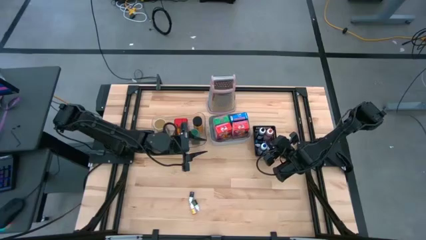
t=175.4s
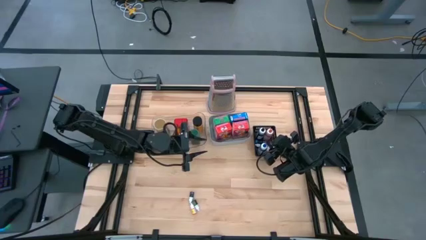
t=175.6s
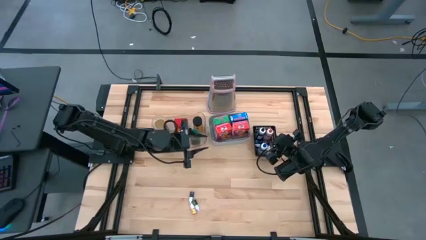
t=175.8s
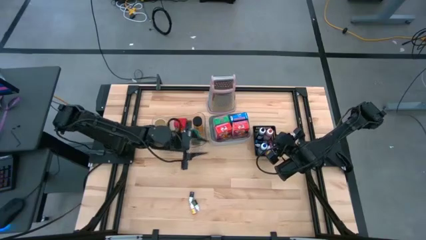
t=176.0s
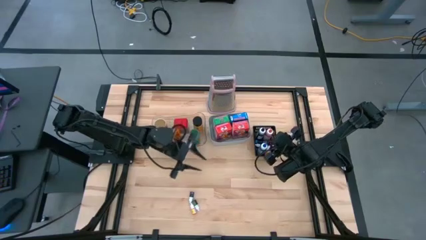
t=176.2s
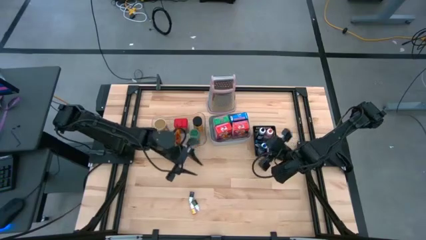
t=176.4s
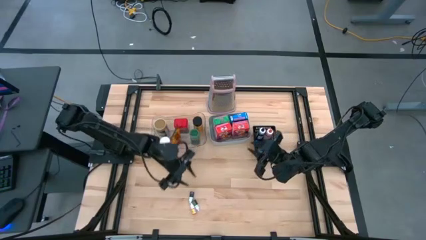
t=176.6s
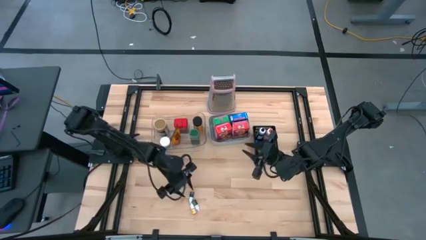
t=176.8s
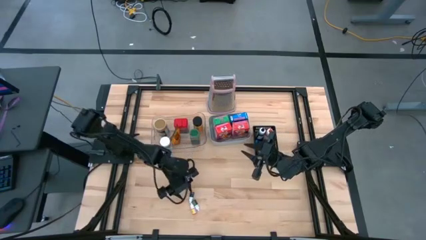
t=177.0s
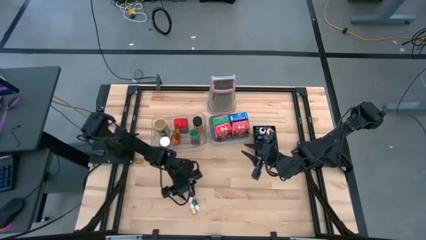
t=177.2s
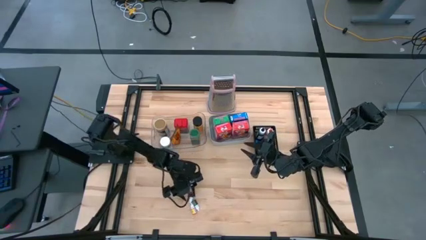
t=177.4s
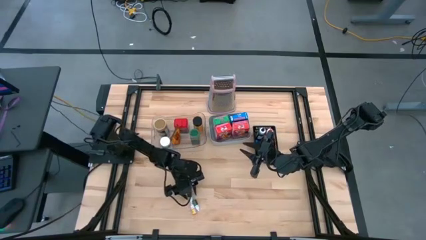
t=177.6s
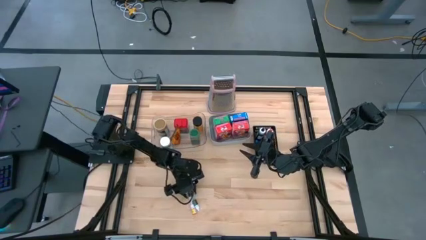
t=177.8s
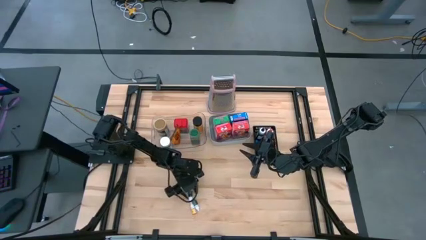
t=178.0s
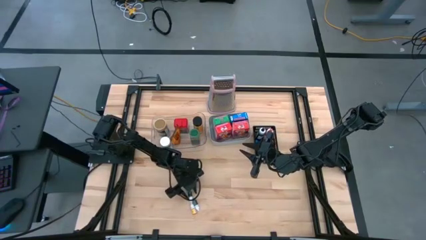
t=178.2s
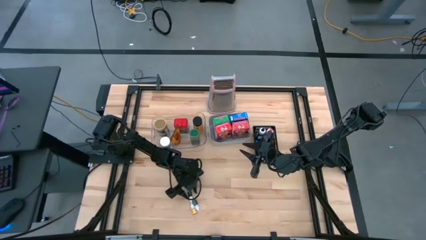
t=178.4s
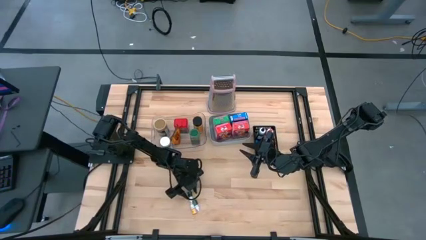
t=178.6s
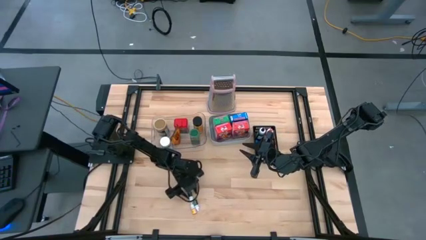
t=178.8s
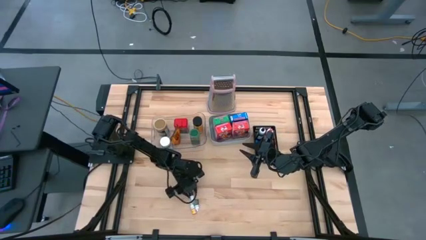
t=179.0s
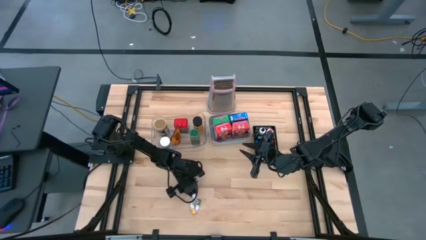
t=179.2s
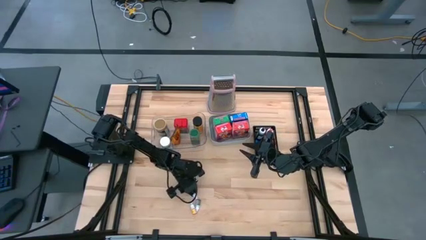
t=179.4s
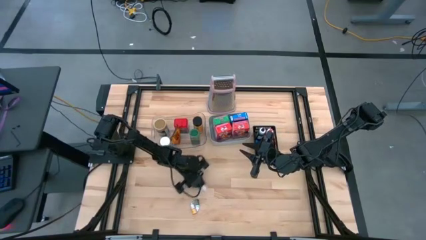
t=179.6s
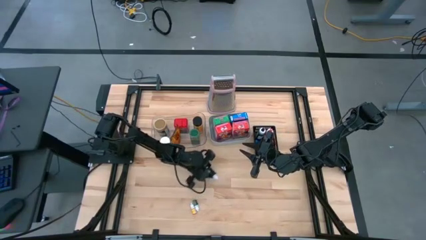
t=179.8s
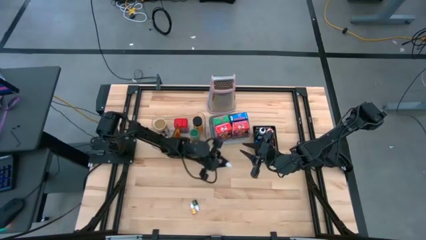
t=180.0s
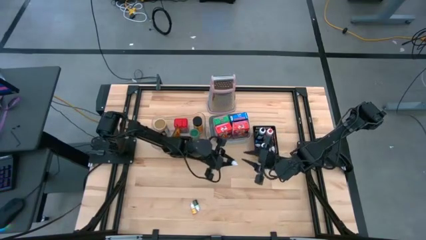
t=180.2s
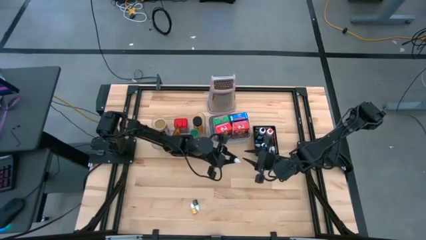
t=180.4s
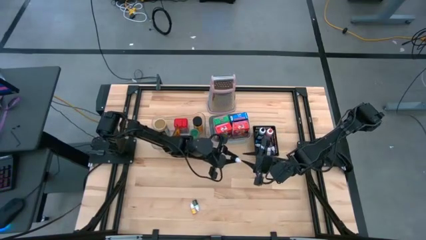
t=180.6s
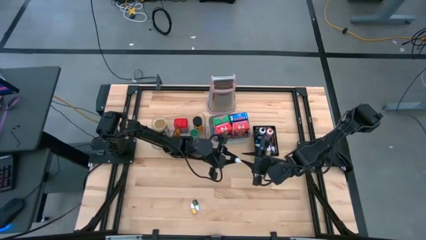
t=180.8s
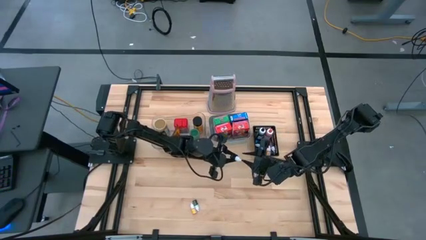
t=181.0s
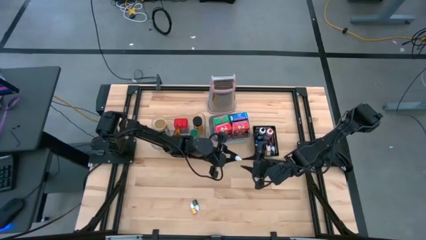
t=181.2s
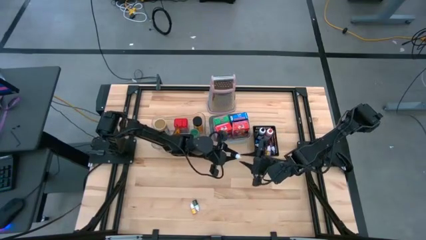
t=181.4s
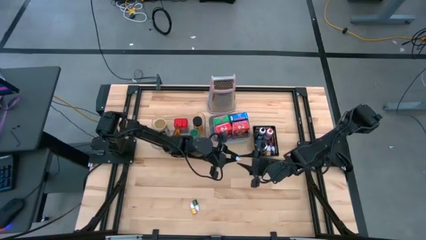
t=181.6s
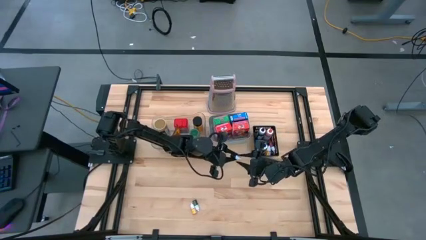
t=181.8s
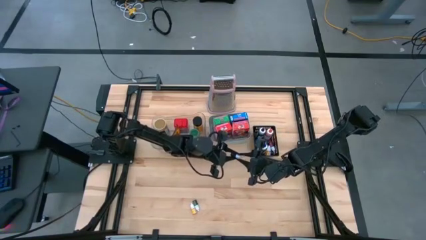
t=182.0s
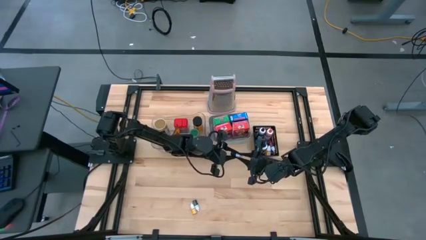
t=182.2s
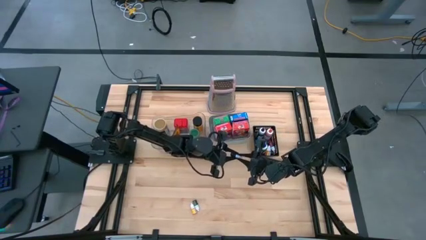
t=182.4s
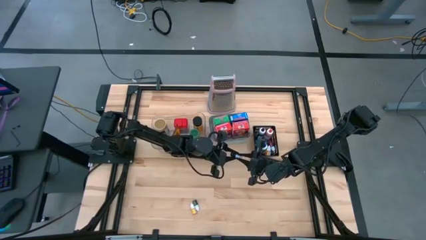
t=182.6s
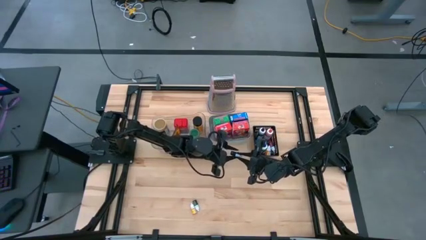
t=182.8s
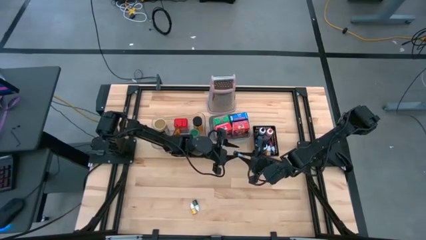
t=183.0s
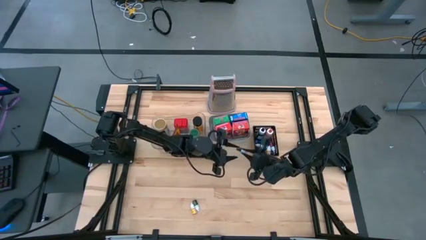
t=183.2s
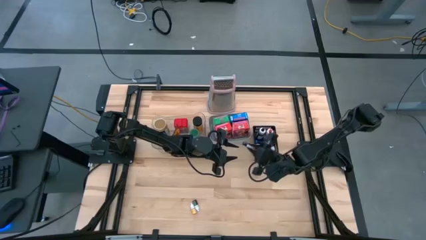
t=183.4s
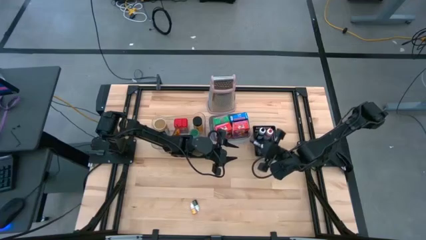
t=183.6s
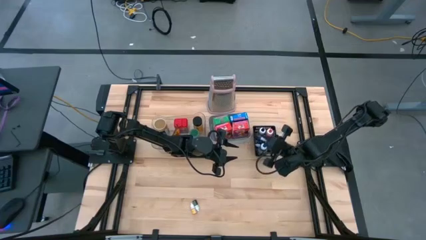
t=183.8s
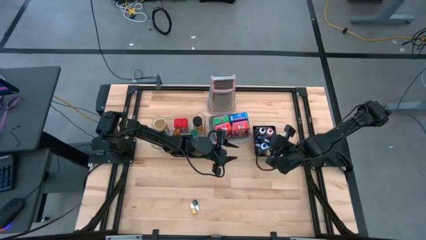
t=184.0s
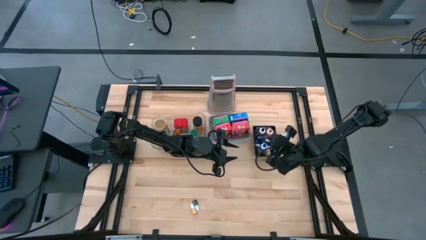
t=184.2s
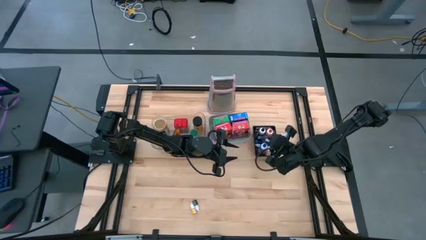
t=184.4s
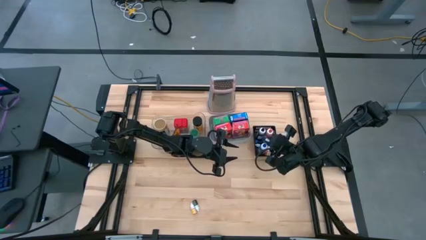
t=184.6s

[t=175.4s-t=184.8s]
Task: Pick & Place Kitchen Items
Put the small violet food coloring bottle into the black basket

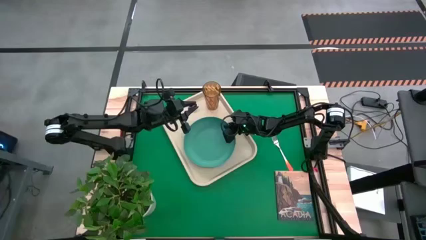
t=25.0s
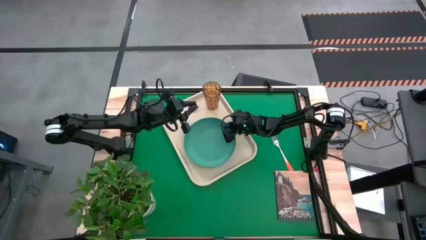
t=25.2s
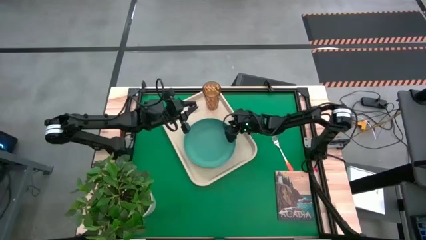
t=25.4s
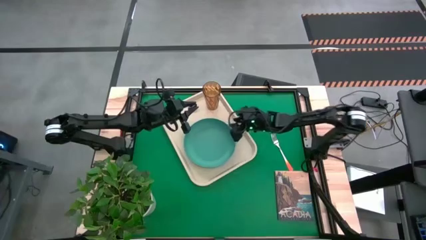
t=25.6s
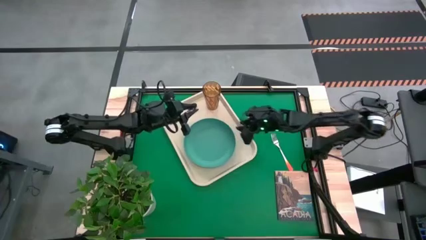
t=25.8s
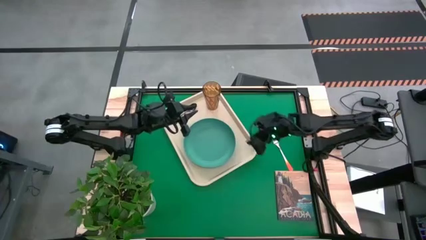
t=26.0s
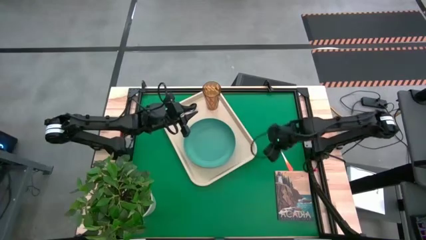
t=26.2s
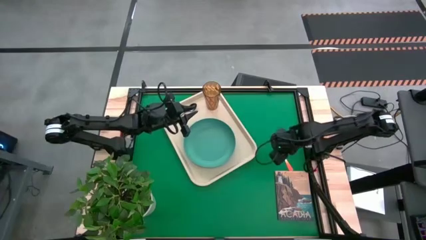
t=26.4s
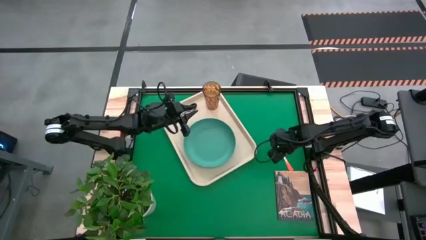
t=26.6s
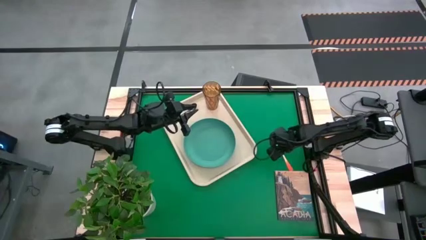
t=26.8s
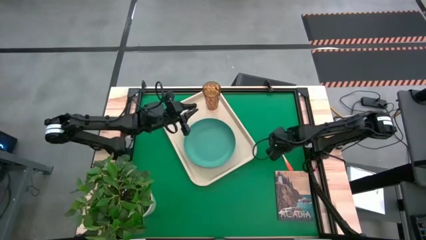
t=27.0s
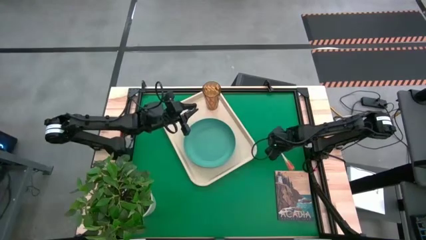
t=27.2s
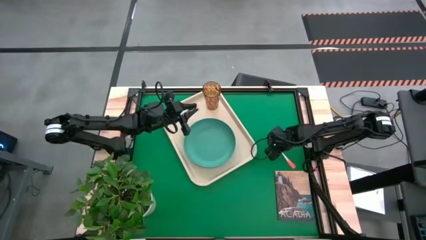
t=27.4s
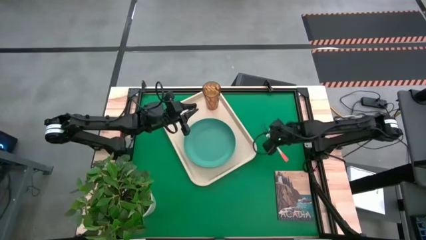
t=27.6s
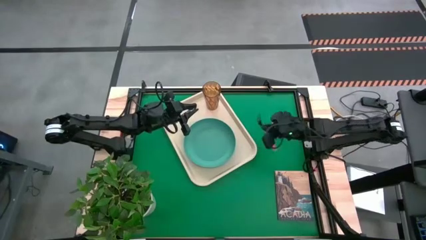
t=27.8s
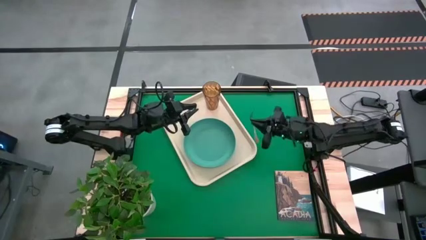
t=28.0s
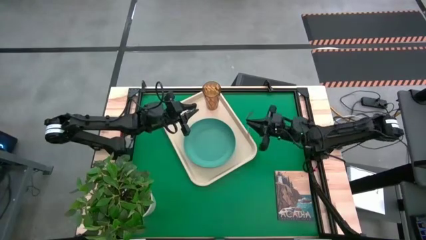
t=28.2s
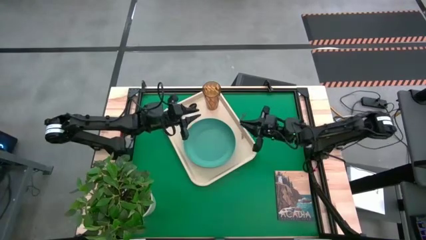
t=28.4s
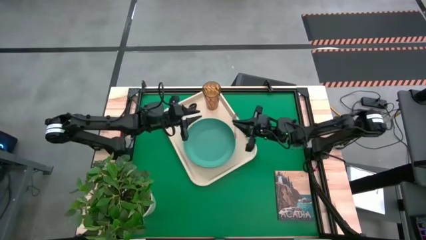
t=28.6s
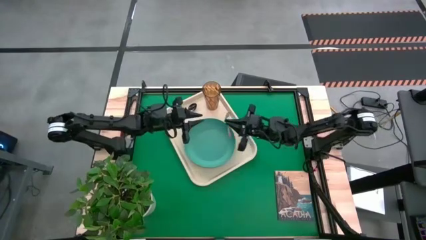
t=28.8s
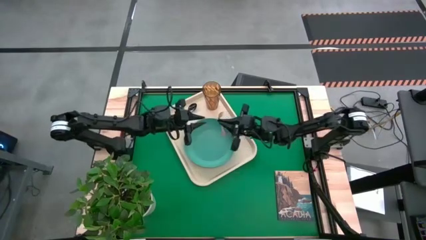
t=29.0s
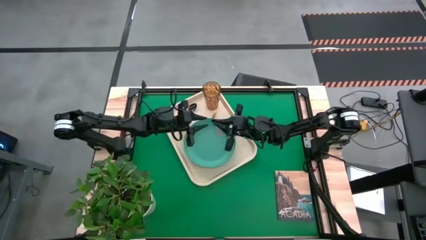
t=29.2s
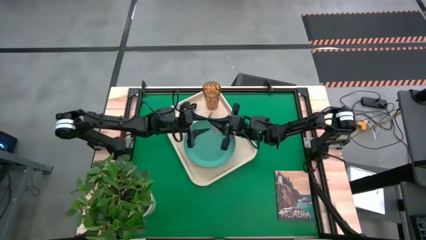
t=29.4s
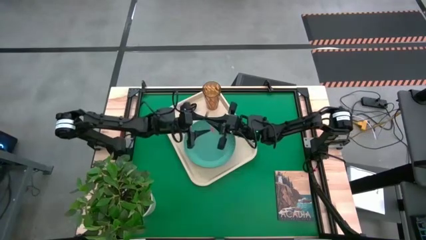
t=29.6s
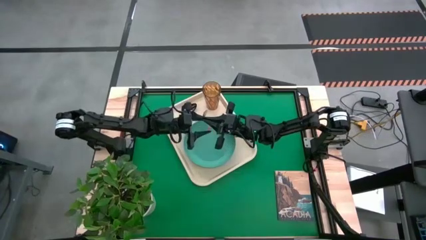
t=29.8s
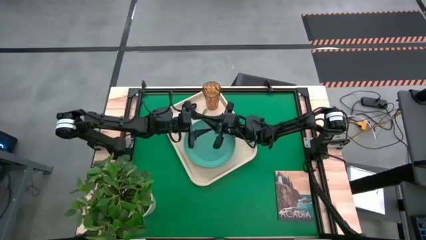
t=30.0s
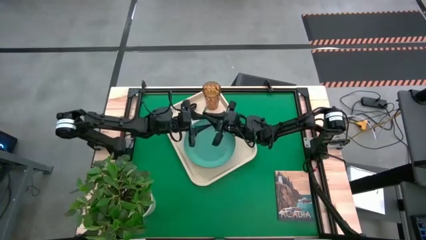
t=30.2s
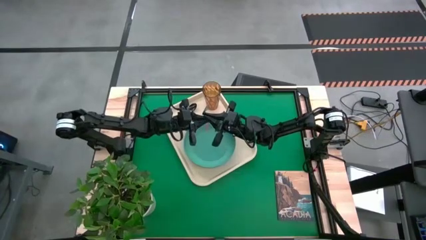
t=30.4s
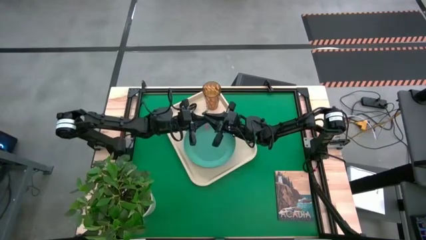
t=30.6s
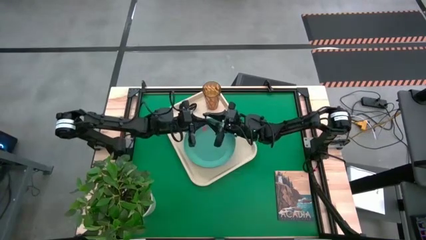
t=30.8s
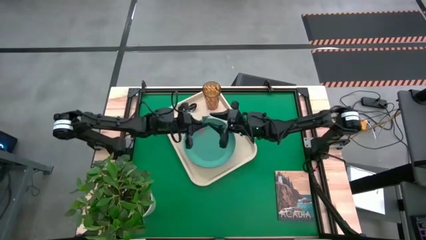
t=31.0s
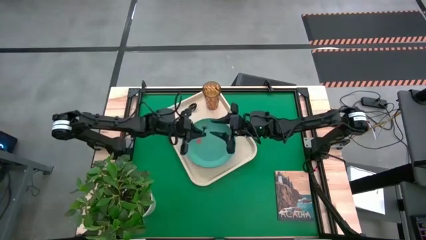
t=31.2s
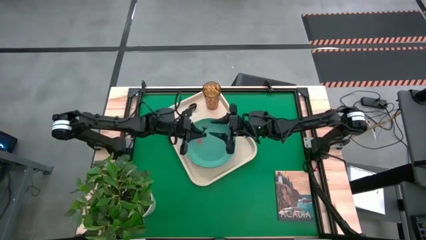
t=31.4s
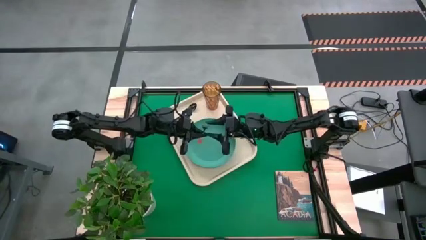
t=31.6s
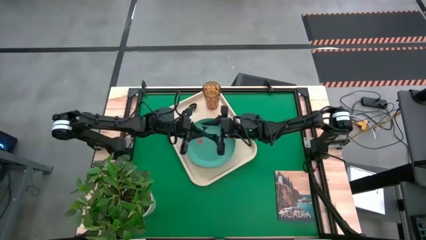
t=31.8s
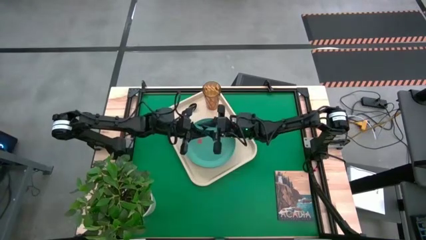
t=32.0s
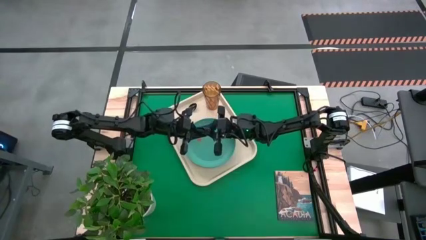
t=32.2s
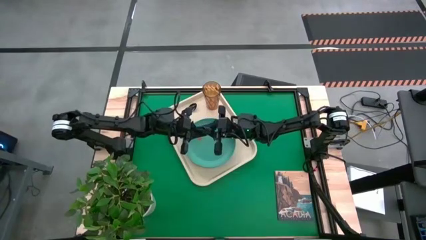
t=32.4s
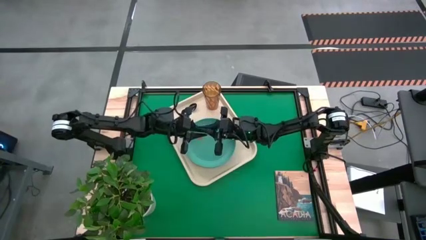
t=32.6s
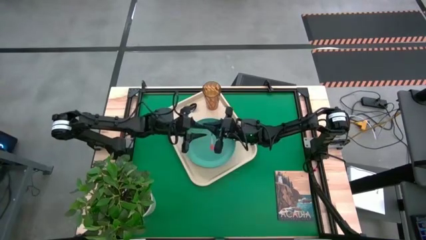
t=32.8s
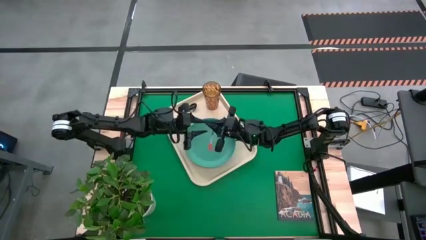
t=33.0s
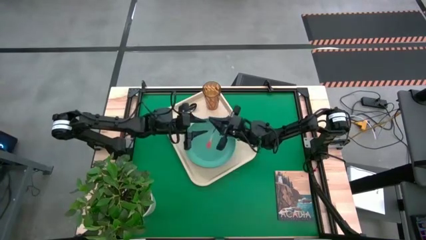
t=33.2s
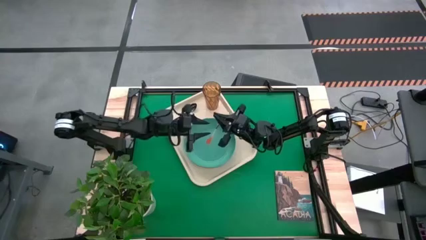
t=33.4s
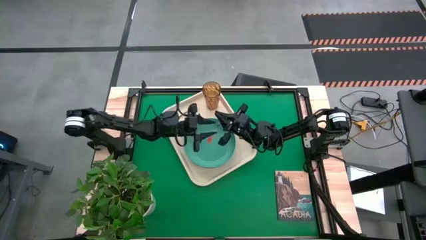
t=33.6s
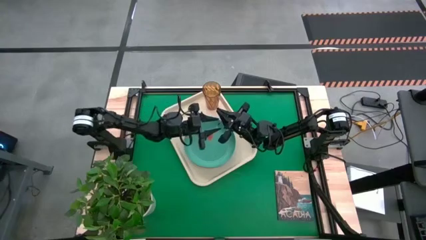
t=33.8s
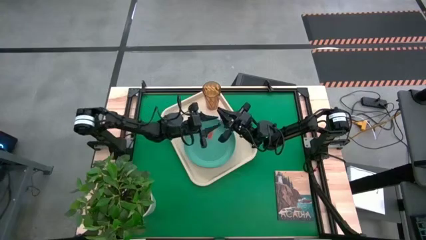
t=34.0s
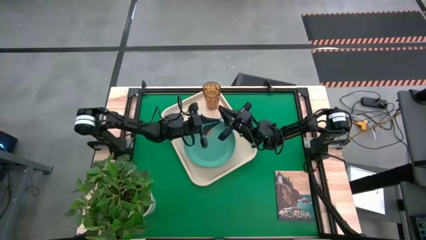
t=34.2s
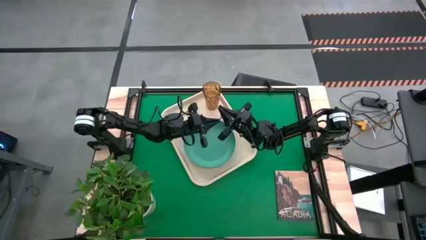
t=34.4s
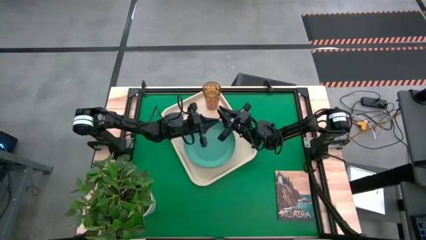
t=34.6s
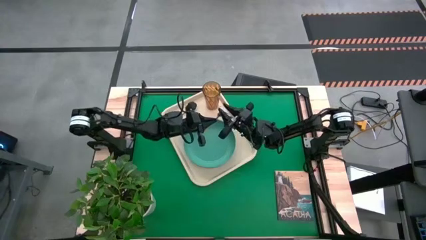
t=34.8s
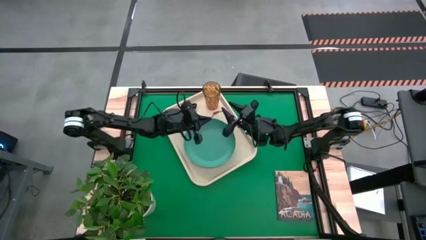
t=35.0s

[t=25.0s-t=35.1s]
Task: Pick and place plate/cup/fork/spoon on tray
Put the orange fork on the white tray under the black spoon
